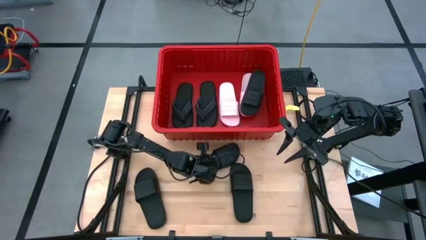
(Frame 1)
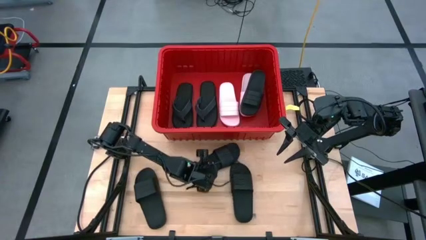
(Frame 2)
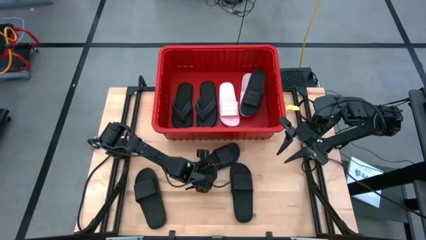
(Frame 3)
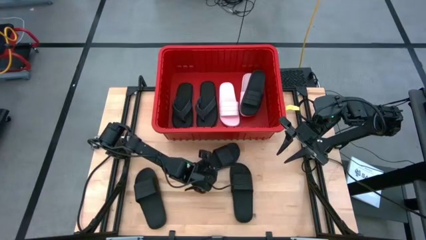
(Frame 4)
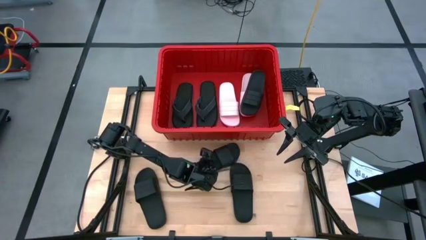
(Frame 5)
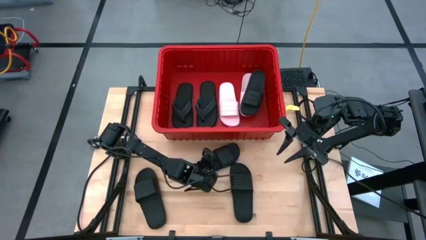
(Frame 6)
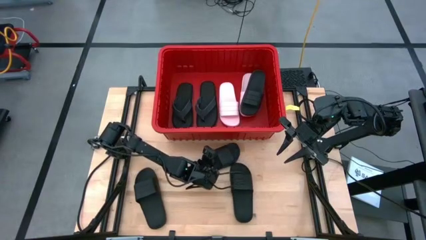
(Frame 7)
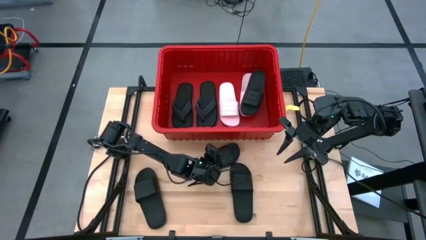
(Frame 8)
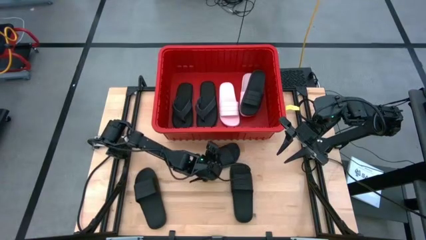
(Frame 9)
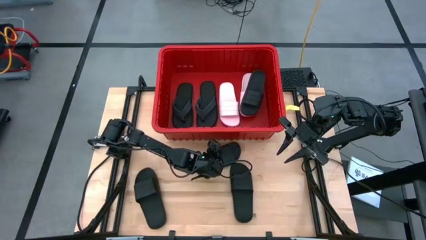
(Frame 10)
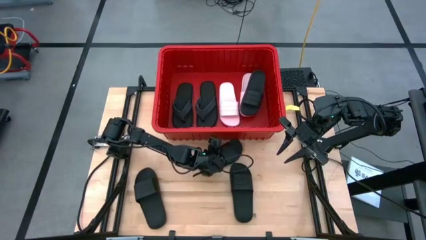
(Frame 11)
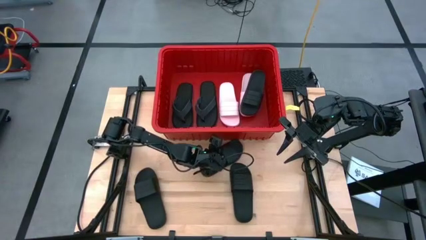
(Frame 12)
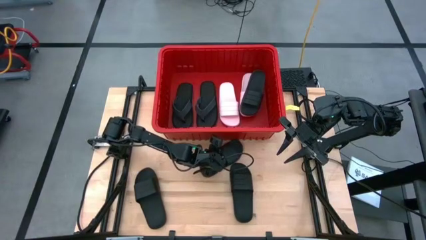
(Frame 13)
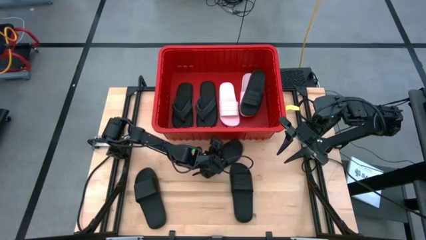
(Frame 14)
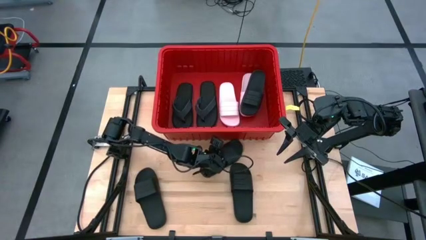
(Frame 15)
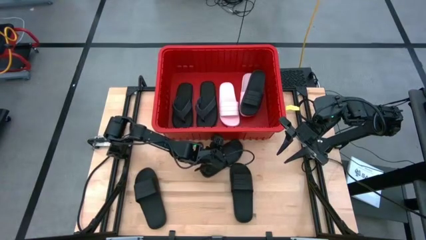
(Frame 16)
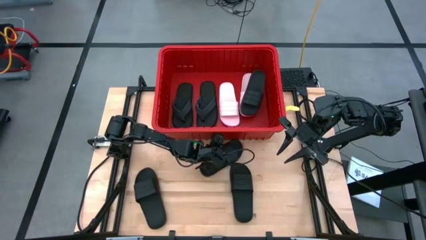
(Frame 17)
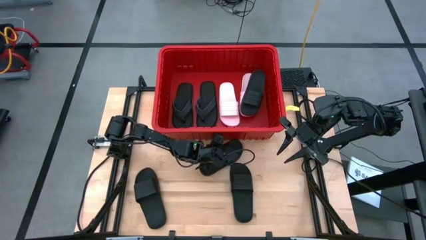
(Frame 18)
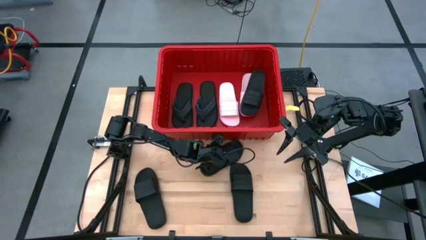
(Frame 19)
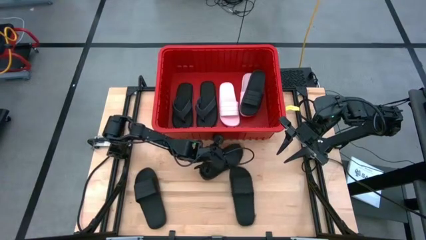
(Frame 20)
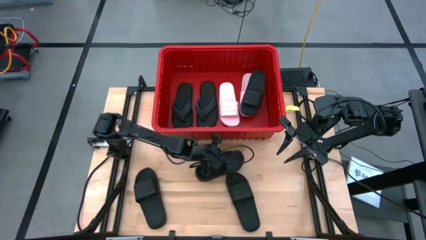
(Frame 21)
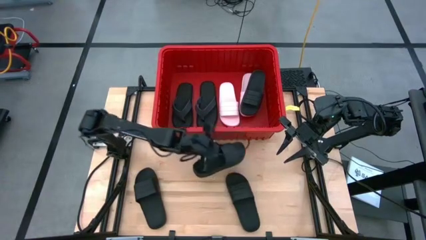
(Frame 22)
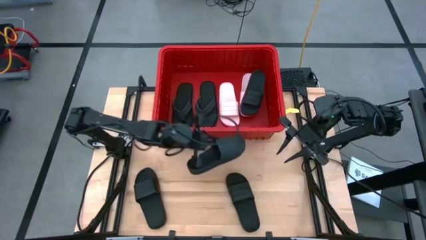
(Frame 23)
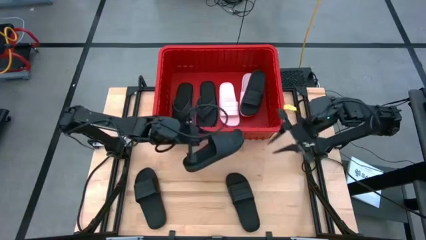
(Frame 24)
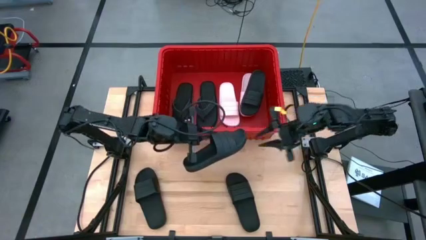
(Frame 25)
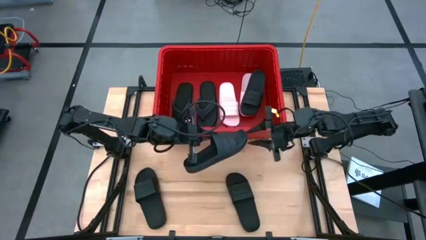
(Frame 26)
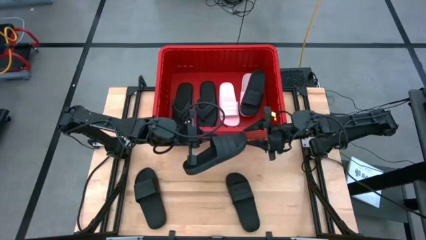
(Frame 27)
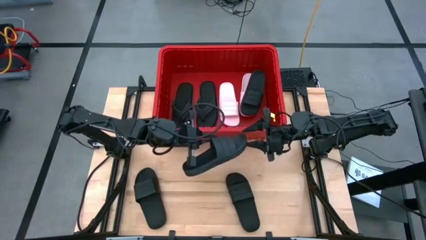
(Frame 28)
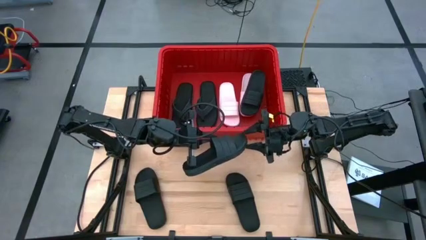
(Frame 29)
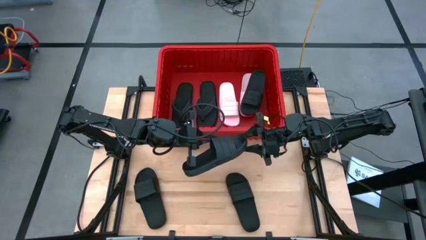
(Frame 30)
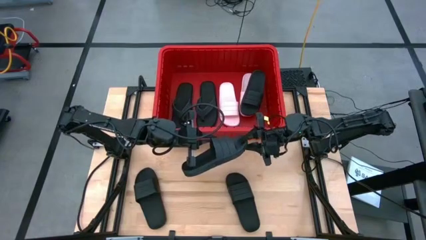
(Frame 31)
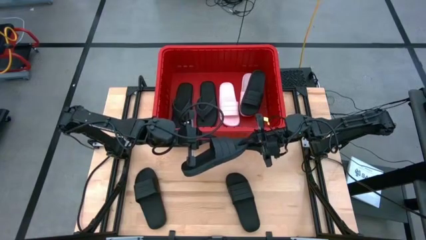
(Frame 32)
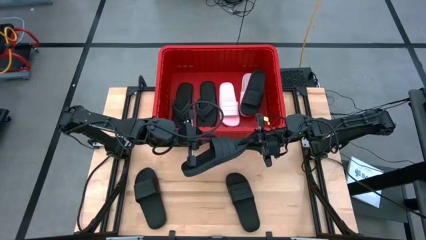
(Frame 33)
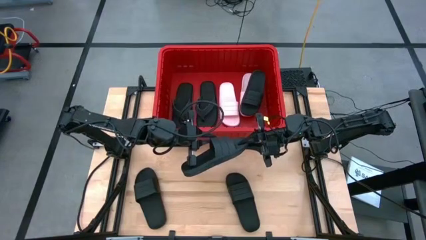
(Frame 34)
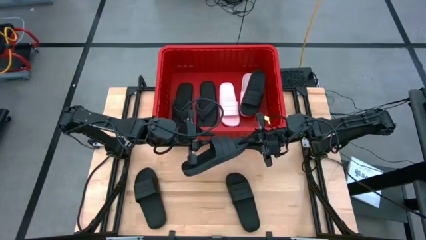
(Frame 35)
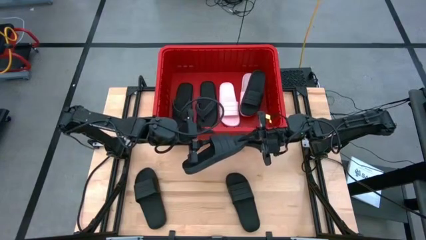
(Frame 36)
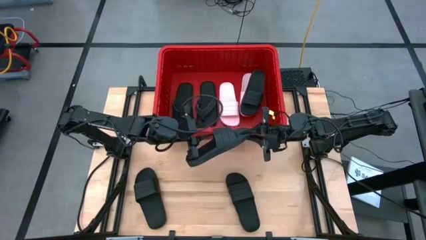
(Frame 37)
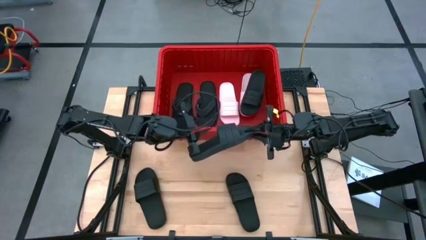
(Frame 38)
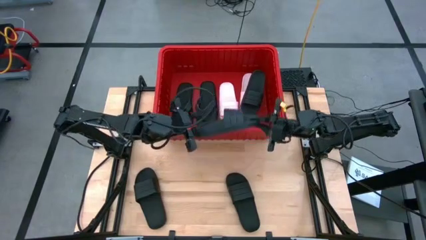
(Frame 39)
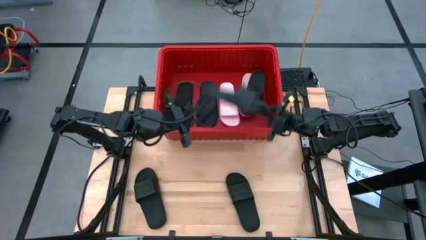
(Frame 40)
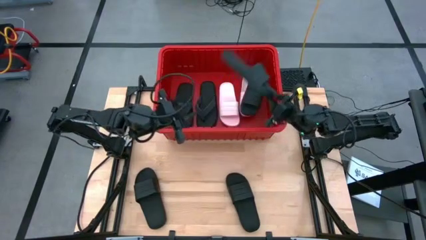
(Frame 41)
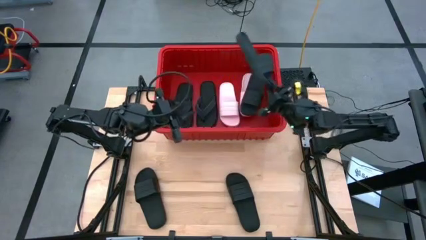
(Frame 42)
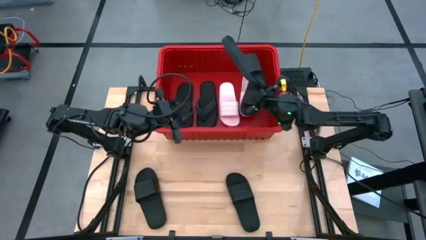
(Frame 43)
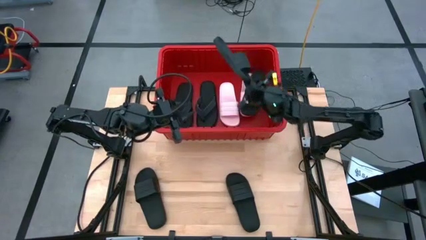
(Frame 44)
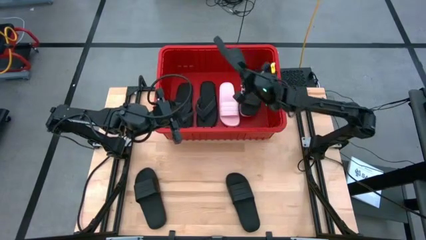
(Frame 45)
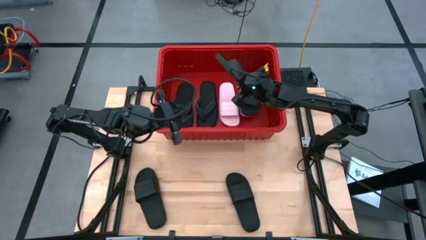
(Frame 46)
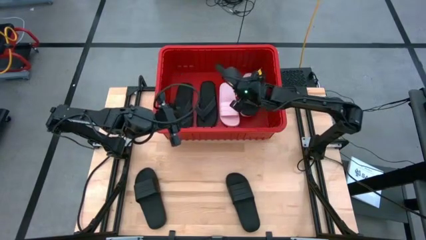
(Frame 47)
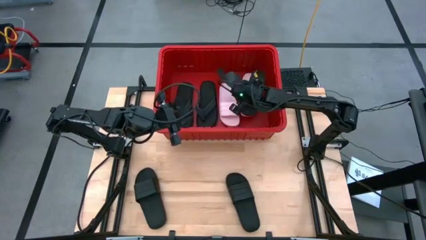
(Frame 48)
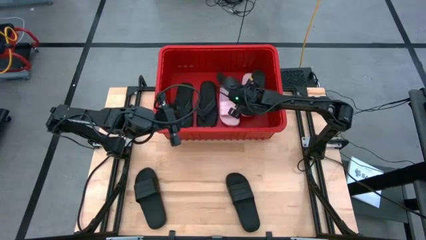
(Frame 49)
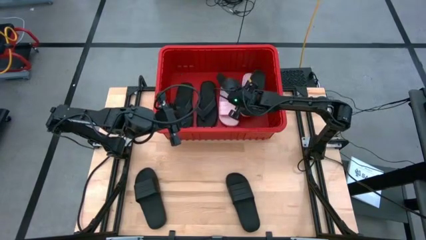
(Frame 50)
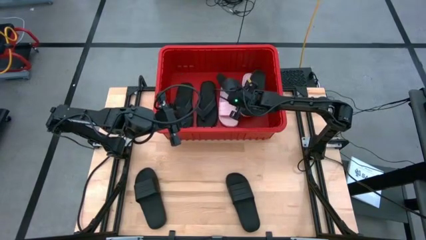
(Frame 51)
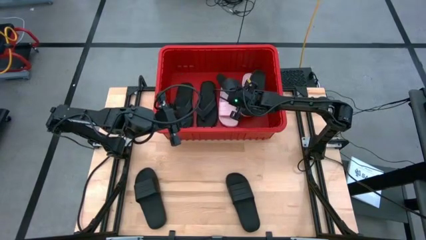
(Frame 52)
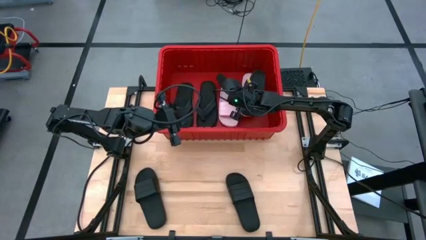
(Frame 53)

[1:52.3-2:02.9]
Task: Pick and place slides into bin
Put the black slide into the red bin

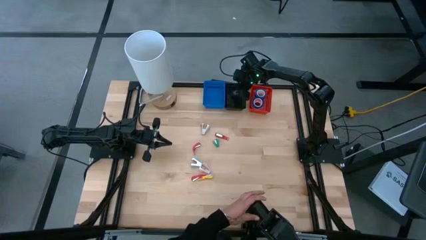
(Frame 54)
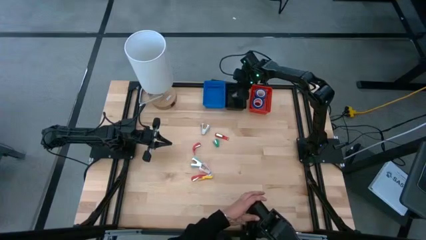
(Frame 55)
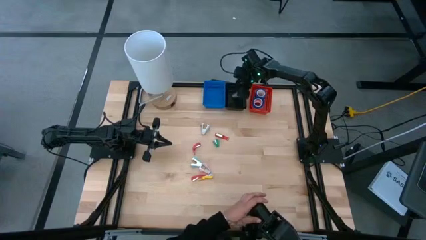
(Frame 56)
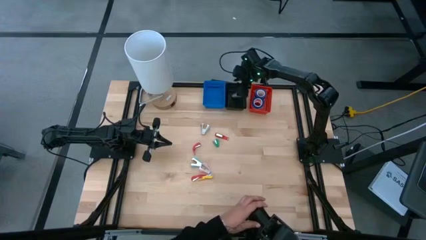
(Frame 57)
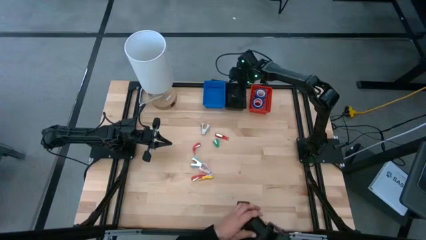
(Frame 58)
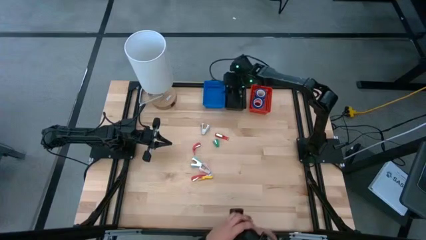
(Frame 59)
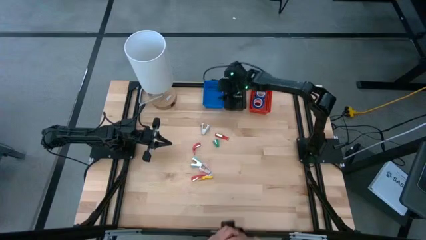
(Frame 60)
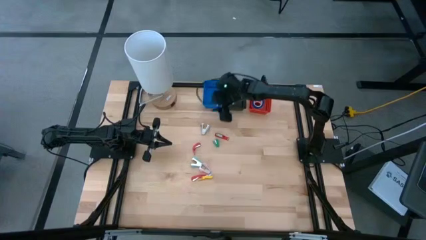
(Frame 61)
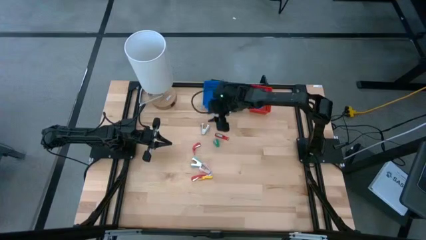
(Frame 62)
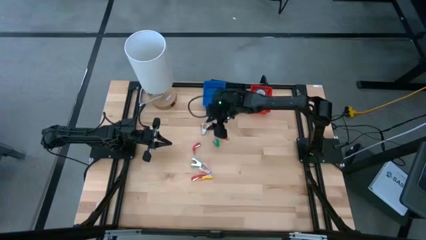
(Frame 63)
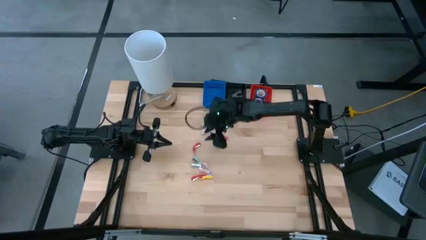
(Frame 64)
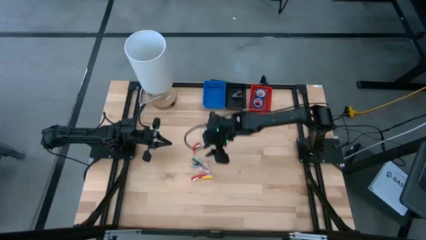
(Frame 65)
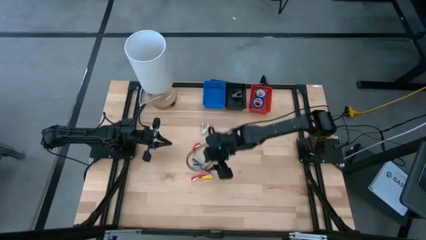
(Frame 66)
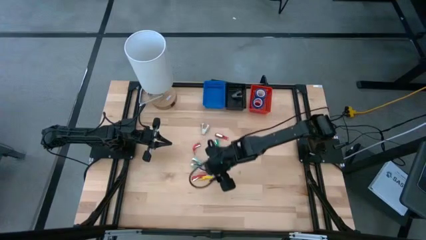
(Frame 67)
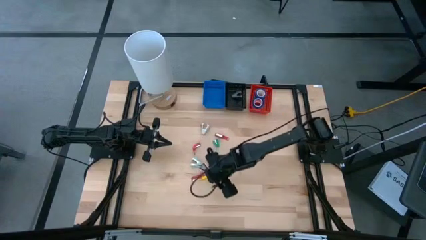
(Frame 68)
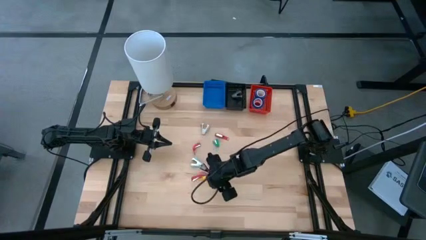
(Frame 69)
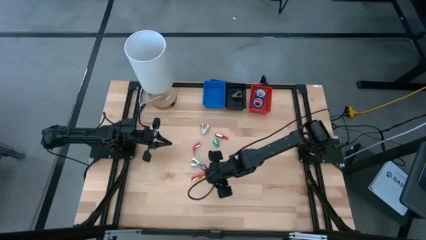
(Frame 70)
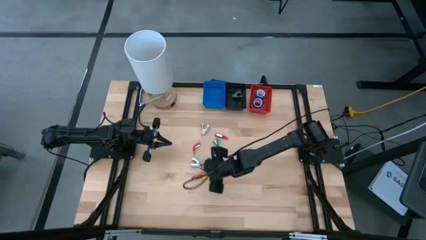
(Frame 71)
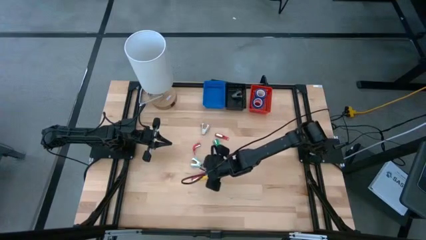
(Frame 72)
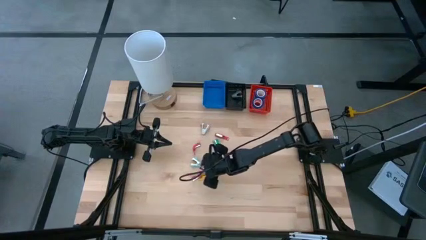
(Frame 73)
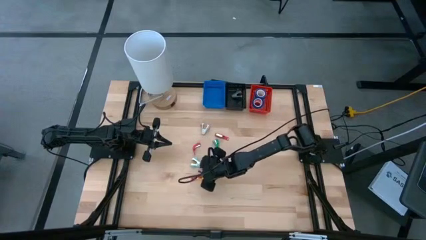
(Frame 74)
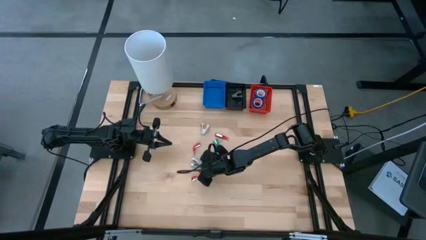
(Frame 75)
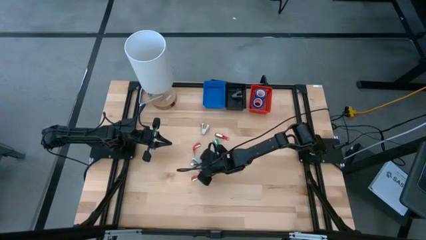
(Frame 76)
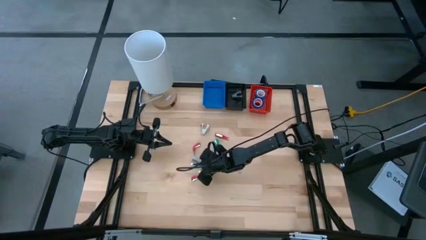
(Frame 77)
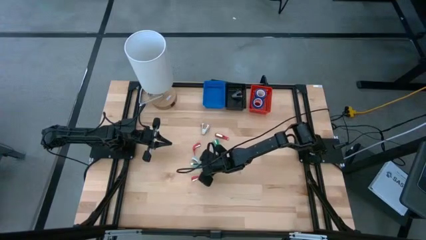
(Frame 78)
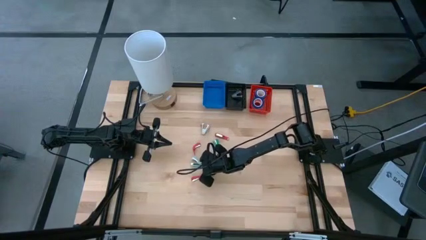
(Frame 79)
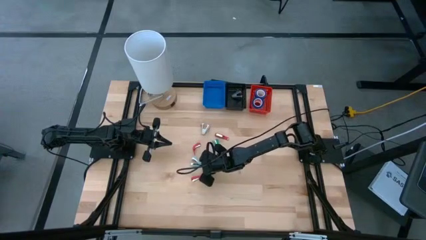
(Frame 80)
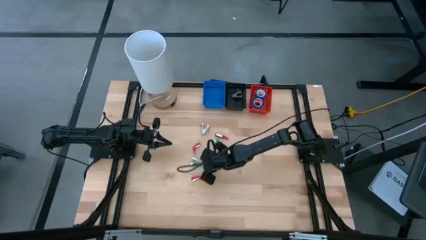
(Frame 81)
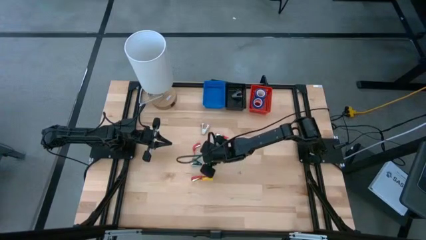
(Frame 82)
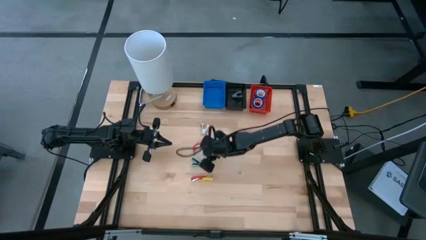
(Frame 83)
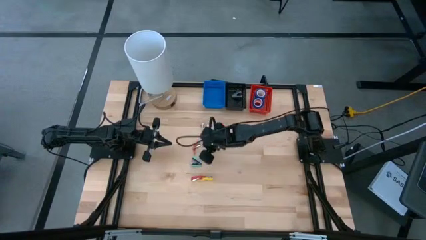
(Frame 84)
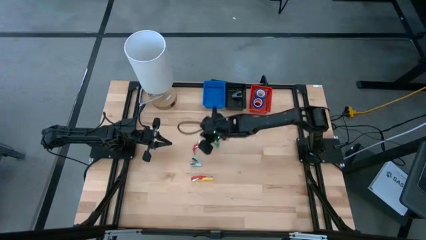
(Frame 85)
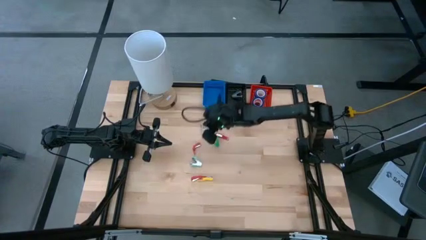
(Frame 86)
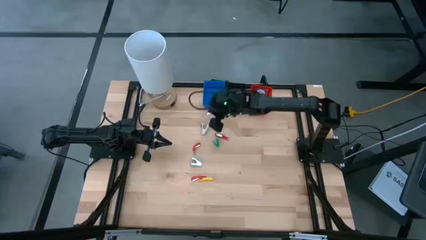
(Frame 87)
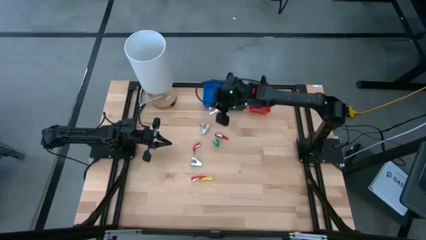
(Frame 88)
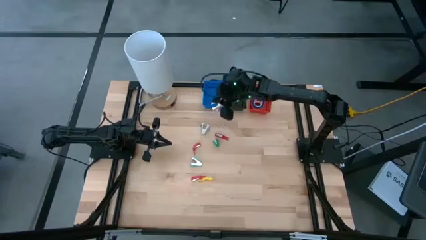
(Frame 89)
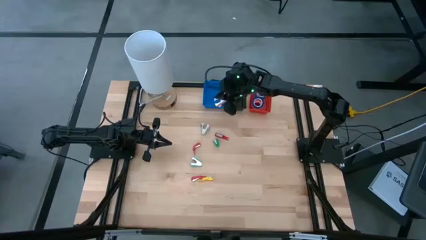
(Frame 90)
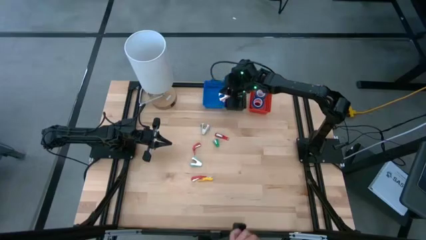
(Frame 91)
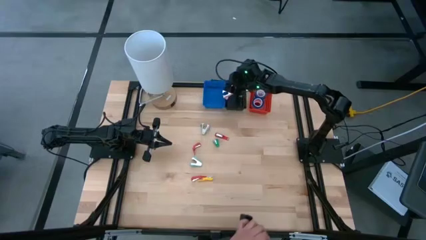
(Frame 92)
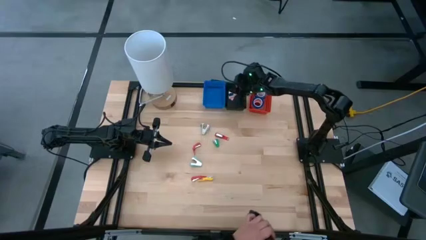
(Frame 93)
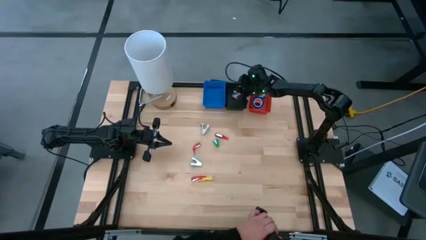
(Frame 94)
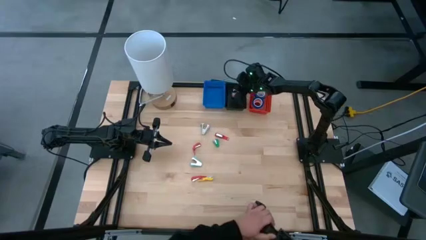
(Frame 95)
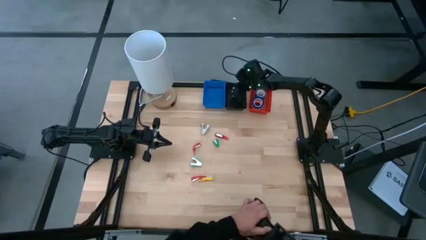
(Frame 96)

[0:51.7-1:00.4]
Task: Pick and place Stapler, Stapler remover, tape
Put the pink staple remover into the black bin
